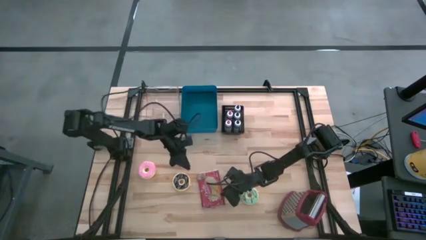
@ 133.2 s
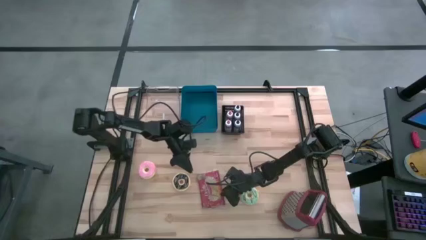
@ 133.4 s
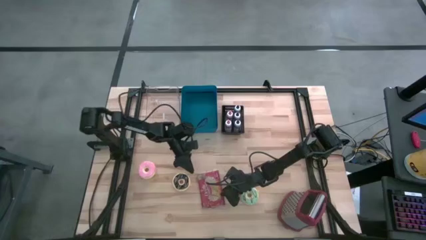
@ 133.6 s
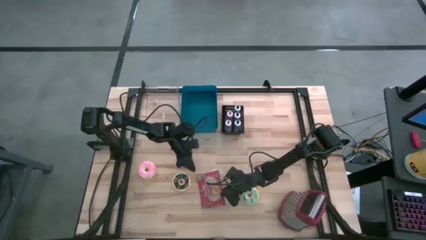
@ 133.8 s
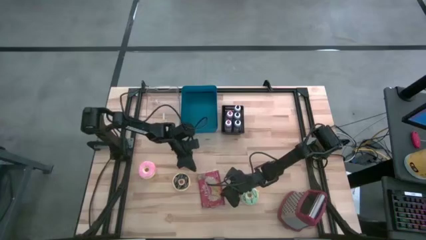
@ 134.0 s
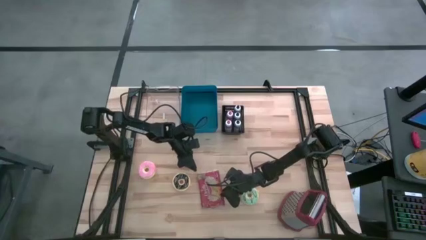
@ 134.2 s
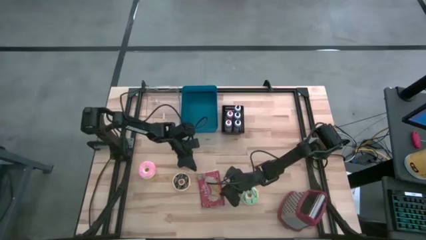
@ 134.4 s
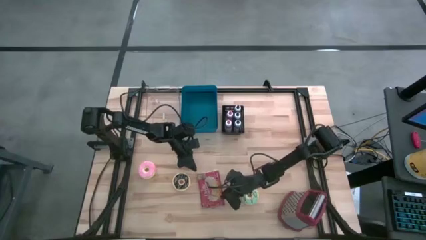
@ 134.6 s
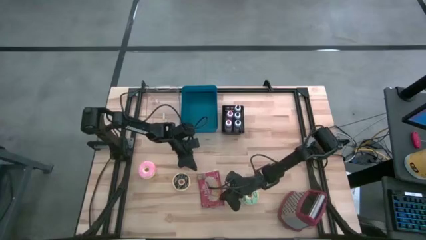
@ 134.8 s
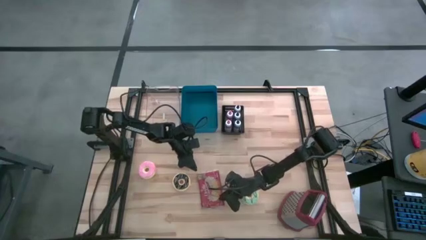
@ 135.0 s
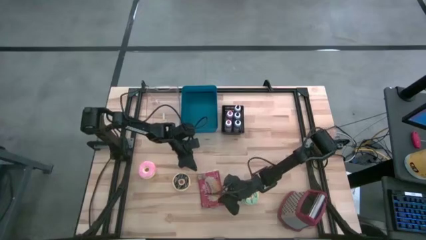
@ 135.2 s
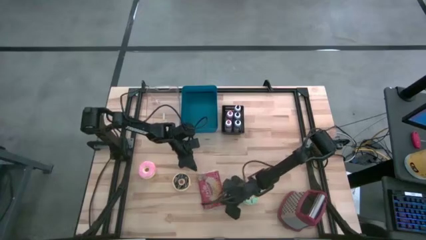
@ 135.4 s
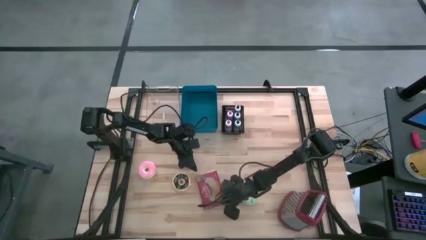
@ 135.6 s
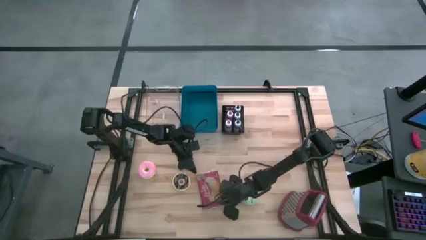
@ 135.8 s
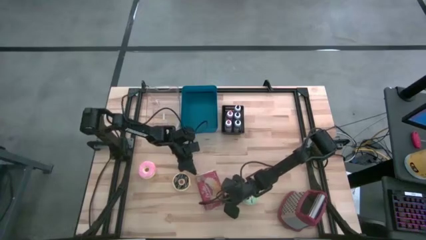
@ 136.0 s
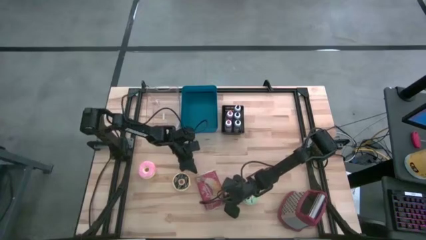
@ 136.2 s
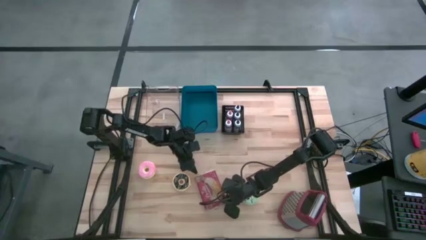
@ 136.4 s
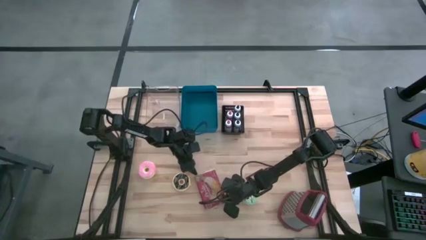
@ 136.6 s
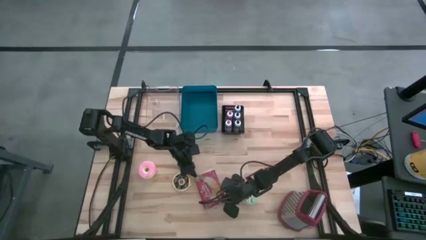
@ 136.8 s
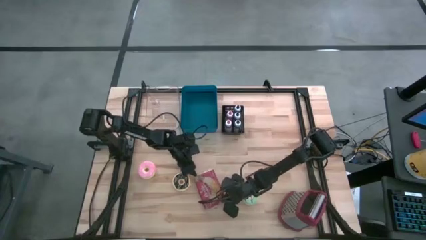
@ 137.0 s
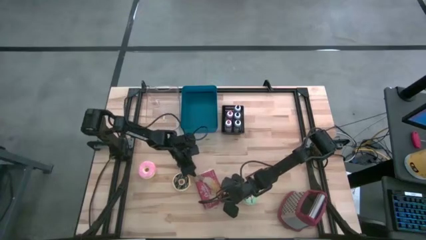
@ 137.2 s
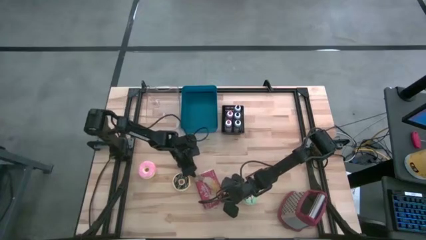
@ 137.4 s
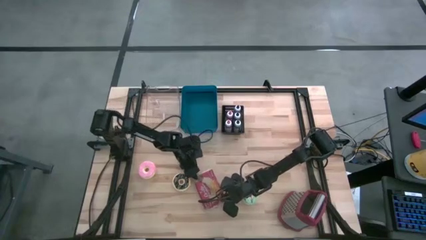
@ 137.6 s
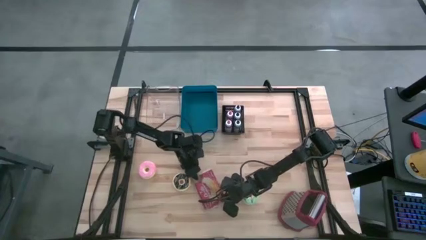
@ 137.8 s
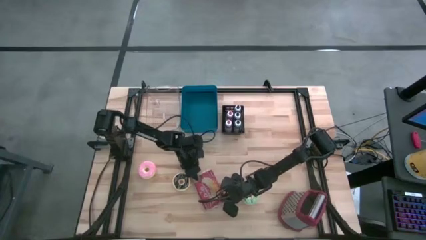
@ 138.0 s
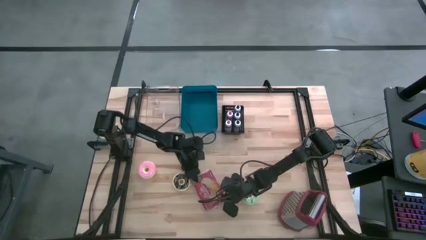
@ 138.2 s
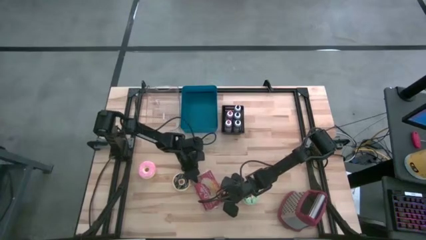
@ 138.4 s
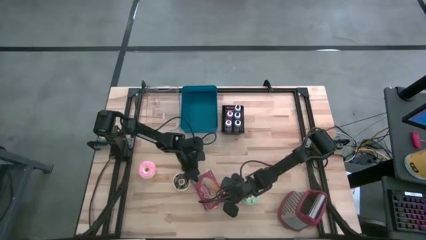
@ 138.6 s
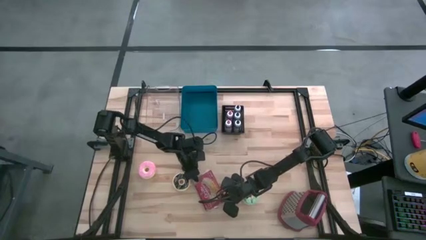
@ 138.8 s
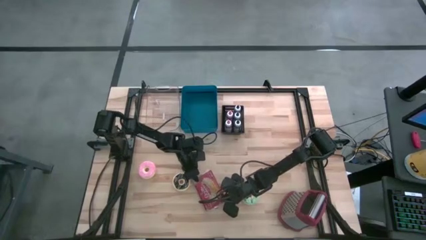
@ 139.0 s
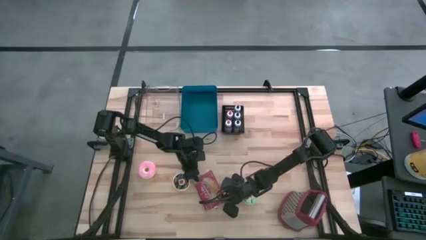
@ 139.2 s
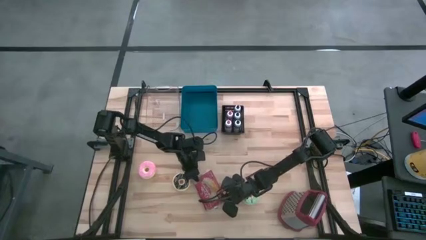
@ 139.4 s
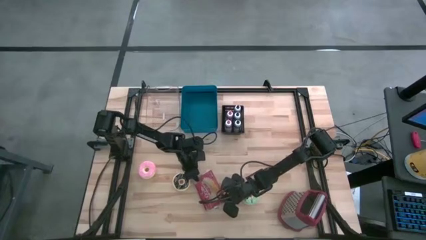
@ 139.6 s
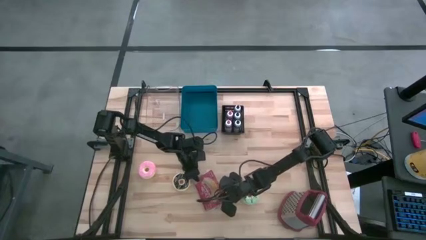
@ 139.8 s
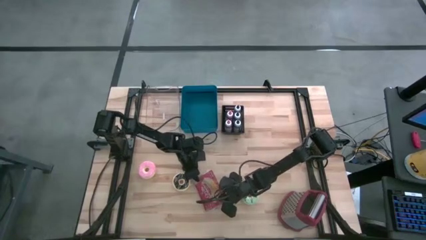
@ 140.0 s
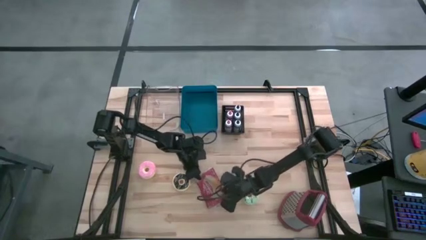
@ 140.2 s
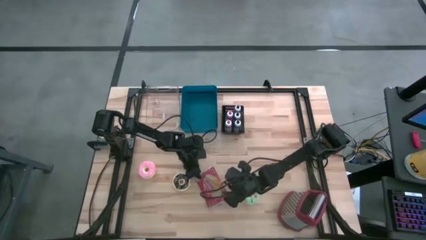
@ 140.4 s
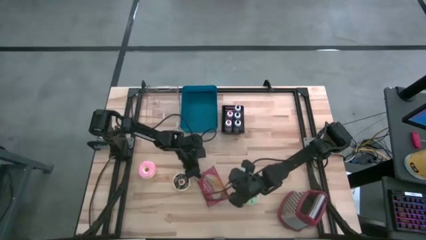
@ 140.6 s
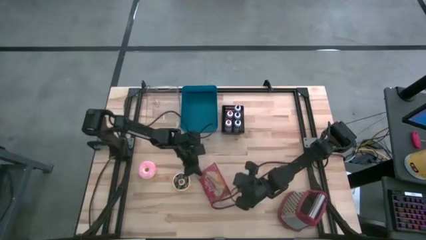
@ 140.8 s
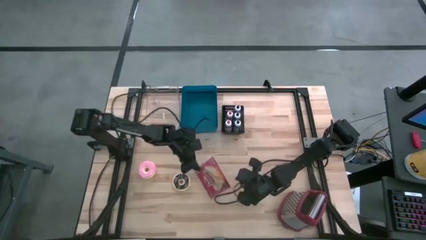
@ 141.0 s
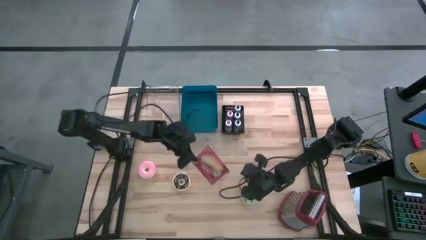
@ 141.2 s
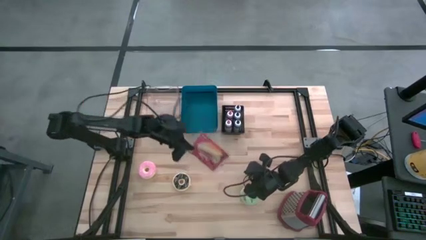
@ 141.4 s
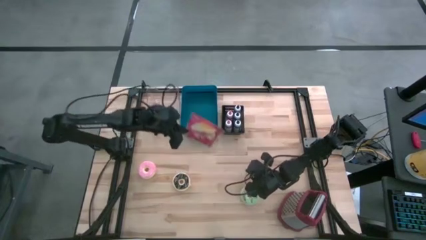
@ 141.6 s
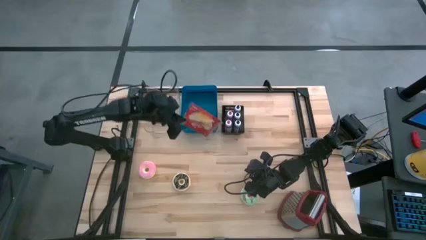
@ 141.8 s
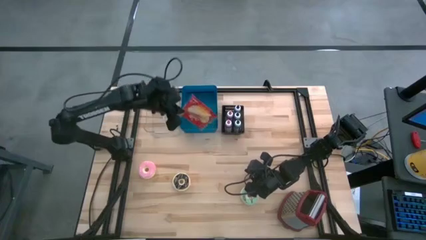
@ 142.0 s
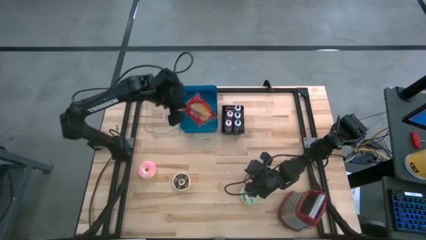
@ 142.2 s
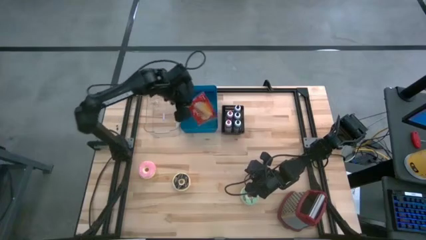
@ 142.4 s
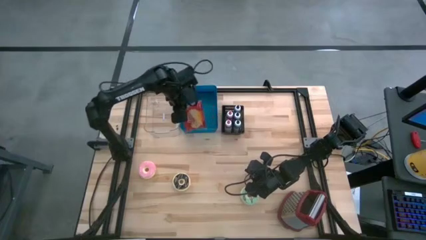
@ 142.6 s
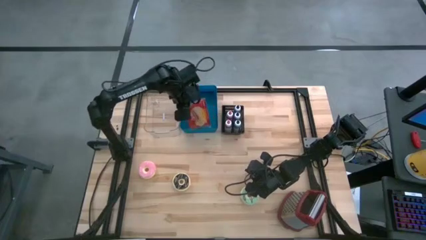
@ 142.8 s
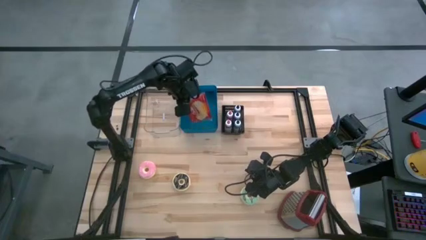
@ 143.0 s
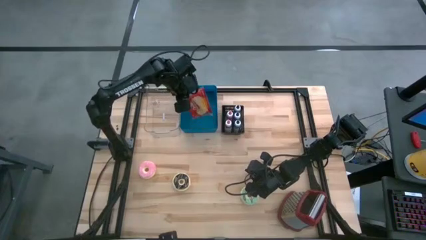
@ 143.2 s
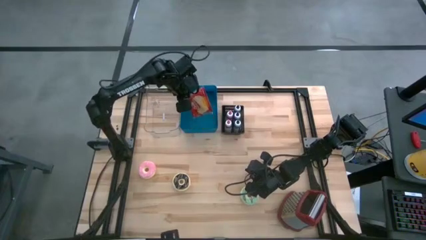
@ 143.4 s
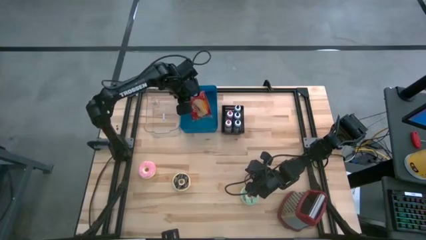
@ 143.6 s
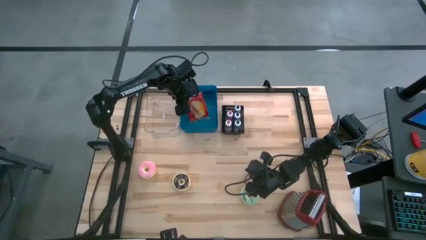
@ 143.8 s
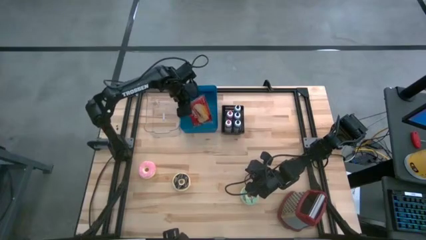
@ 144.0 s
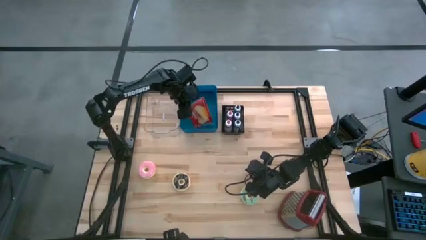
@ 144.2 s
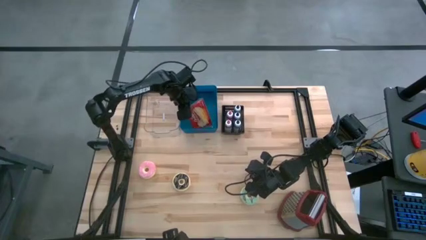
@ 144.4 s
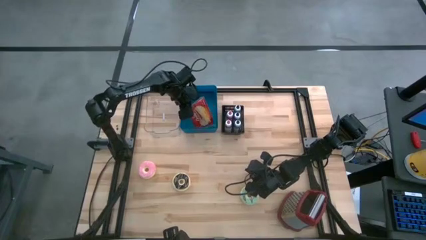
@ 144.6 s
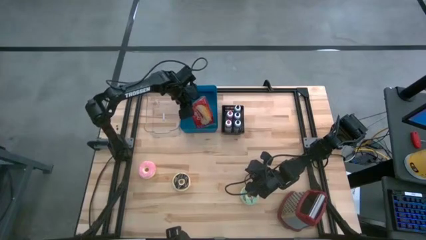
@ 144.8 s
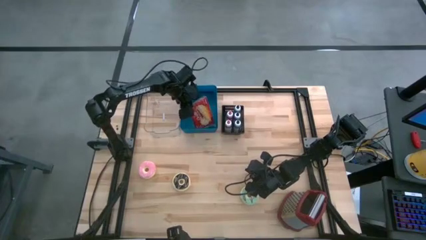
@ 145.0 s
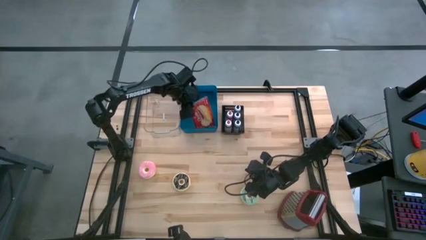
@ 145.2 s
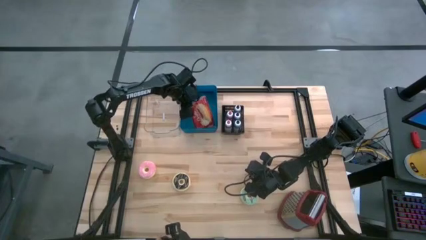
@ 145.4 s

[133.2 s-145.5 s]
Put the popcorn bag into the blue bin
